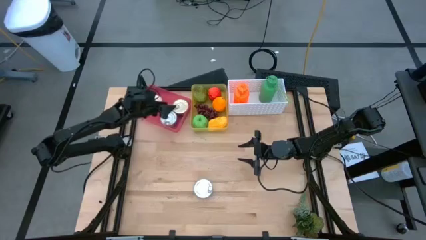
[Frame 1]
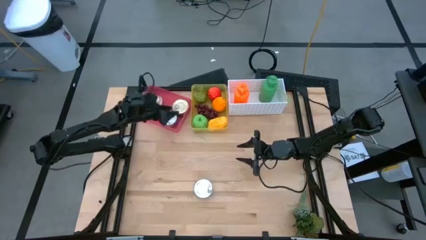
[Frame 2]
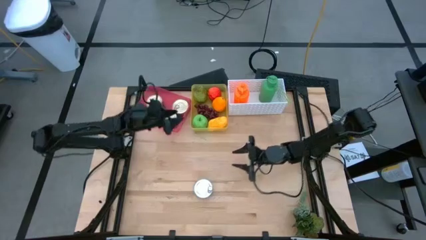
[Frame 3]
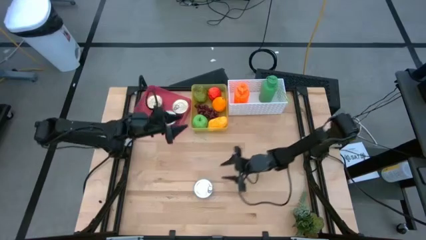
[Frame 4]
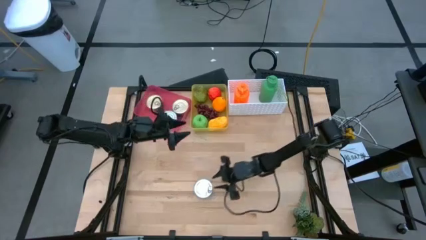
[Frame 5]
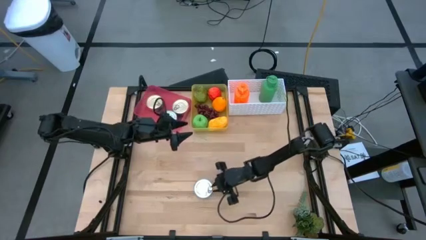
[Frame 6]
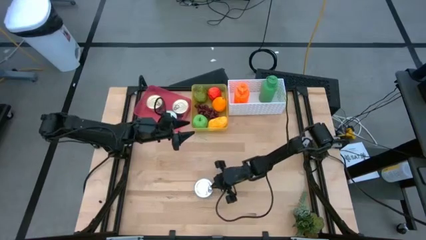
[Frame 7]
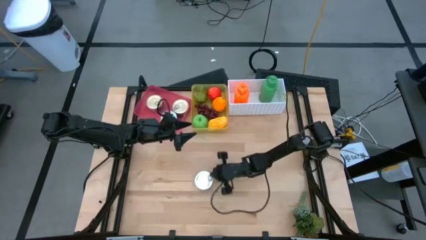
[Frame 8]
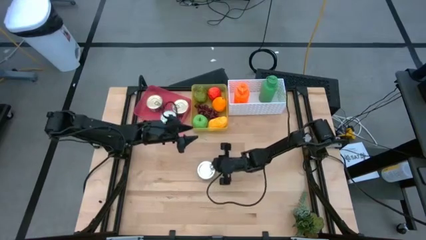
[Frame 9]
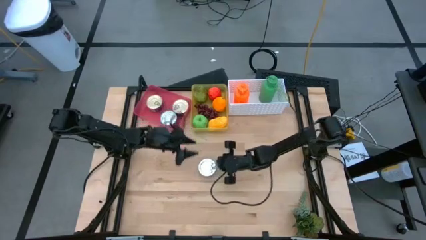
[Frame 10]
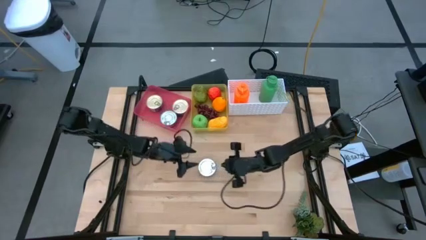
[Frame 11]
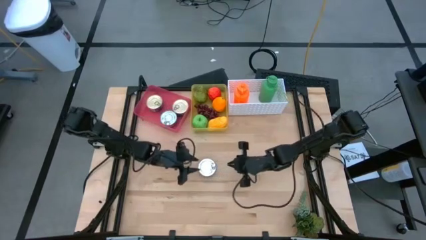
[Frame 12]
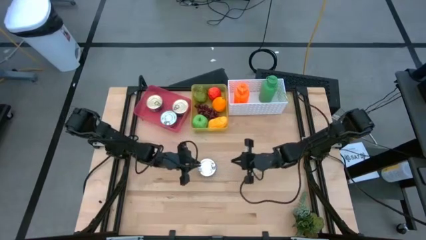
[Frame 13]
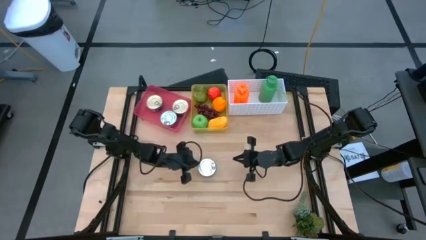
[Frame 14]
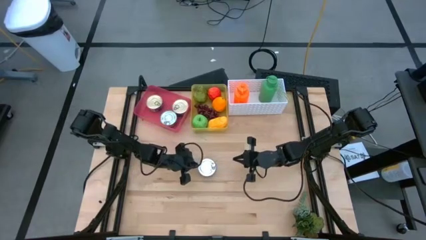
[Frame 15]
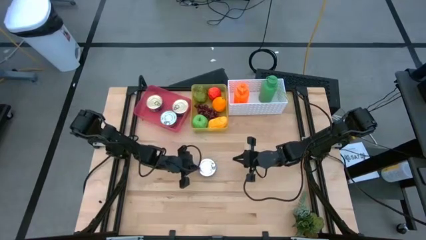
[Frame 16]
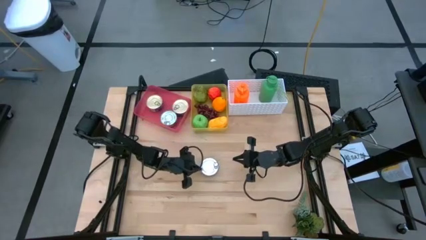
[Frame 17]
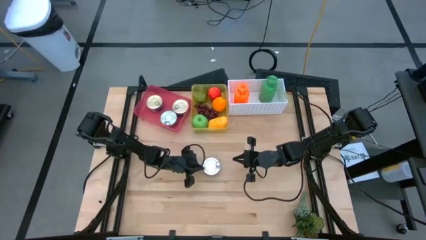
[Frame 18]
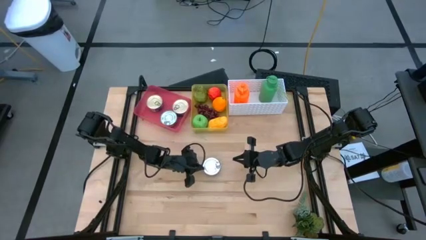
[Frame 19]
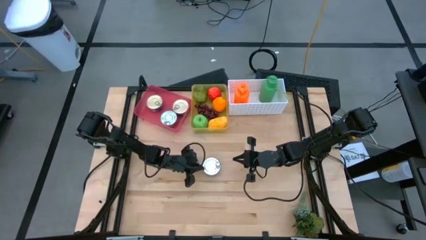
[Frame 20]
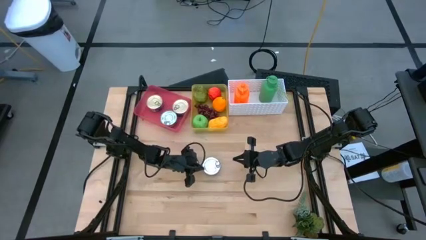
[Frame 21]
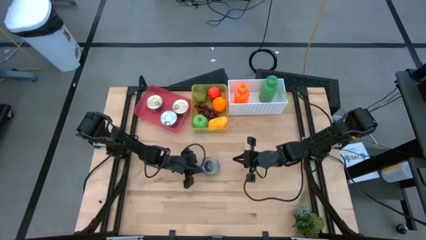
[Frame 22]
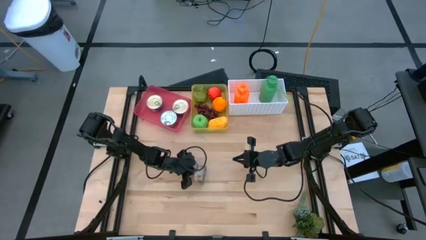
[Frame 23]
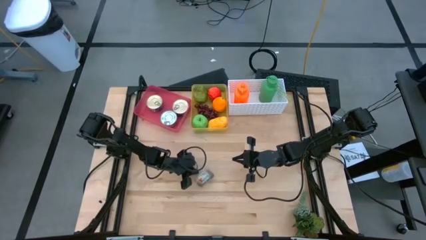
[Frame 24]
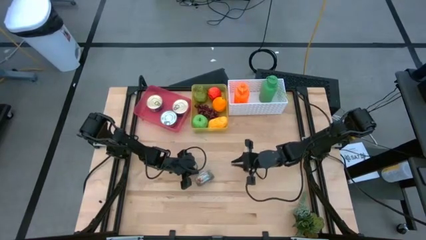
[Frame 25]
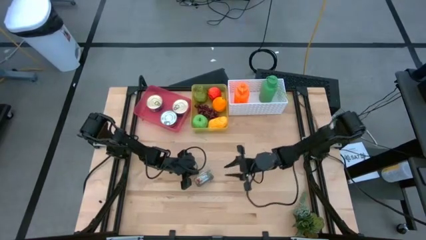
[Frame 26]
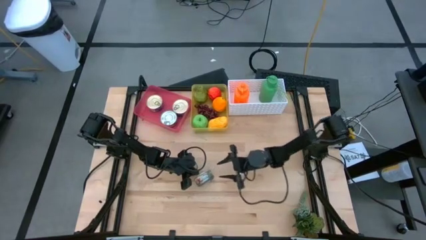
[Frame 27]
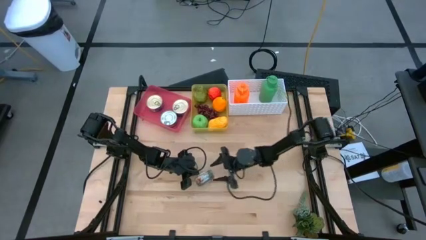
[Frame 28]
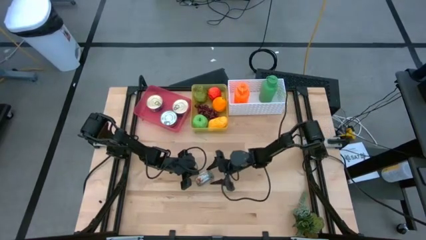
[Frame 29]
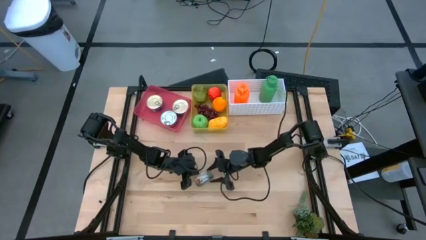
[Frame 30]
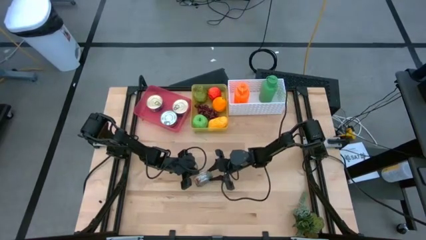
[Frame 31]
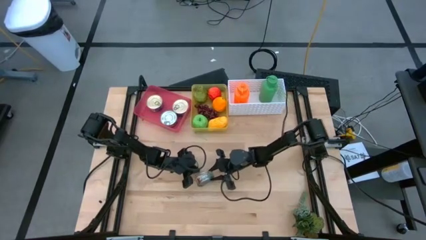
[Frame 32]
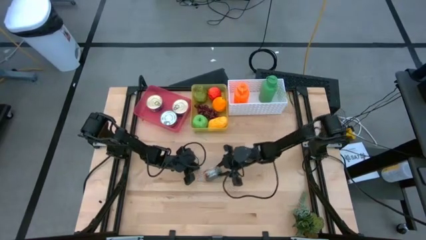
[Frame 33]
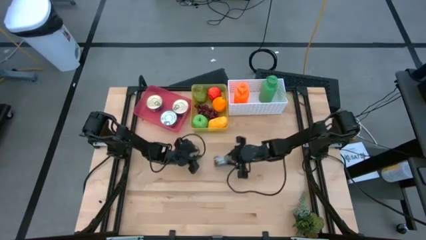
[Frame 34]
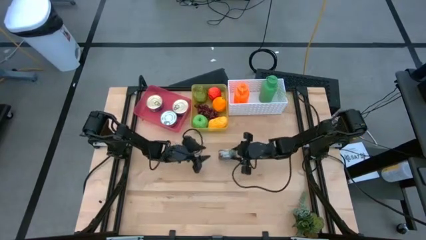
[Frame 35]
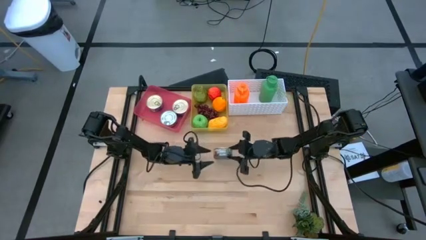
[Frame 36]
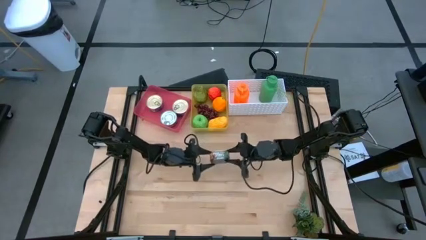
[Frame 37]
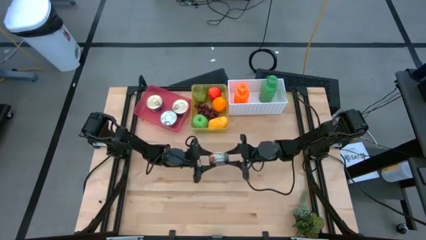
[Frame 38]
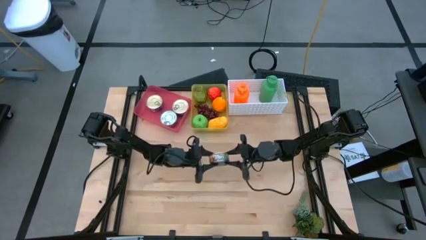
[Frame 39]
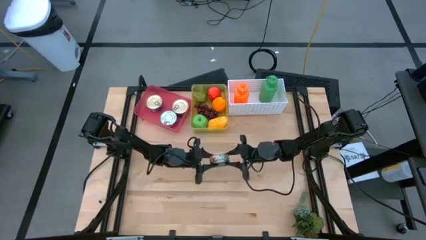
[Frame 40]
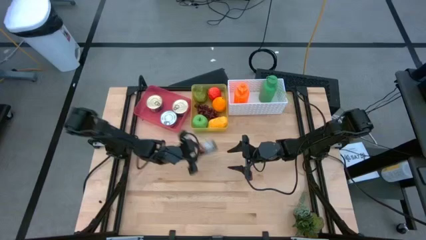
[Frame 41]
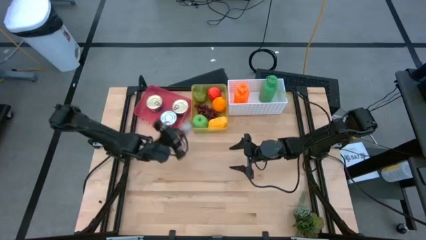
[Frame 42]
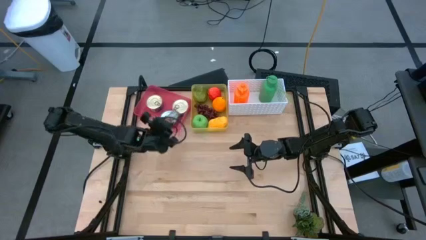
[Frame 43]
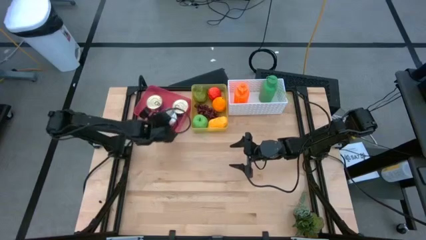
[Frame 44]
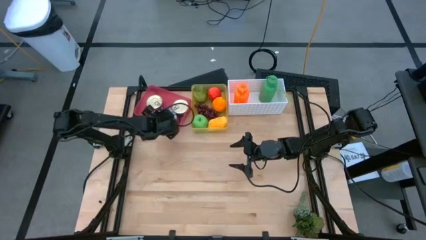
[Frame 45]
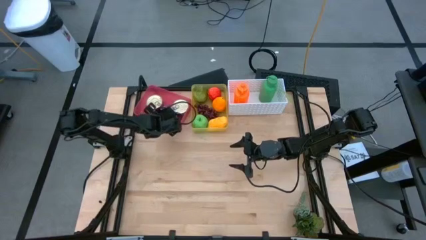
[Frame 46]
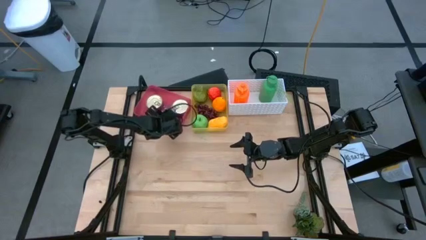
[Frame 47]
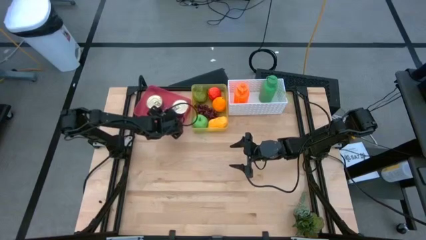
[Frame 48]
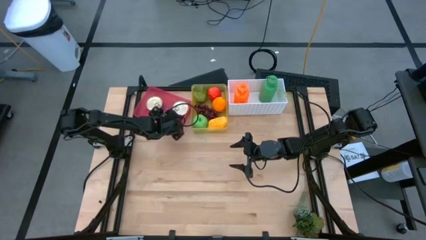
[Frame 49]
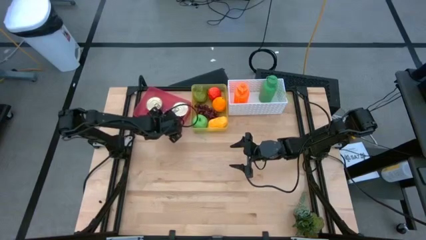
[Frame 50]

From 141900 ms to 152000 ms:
Task: Pick & Place Food Item
Put the green tuna can into the red bin

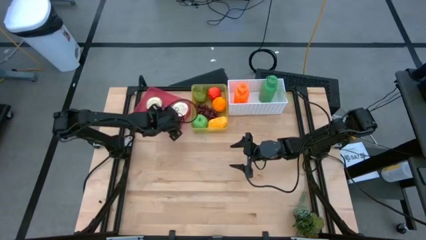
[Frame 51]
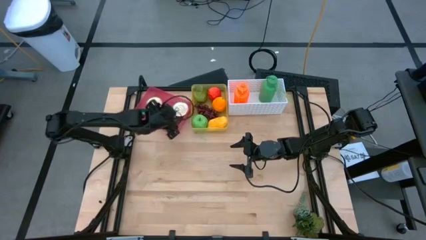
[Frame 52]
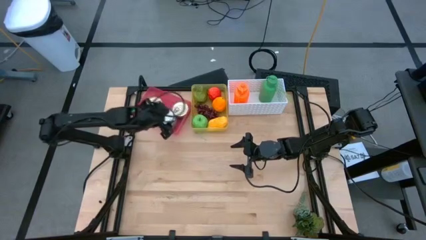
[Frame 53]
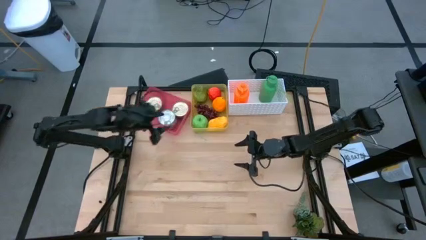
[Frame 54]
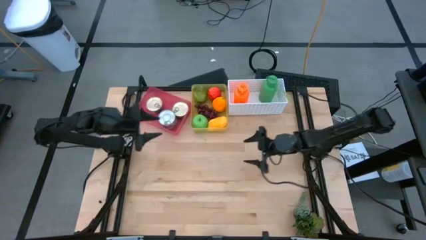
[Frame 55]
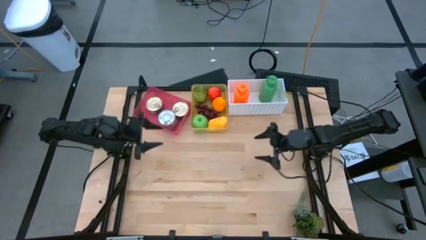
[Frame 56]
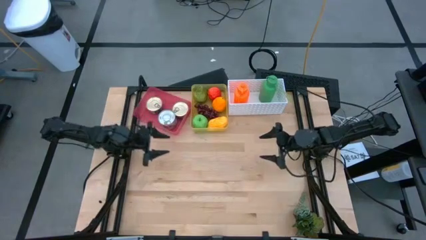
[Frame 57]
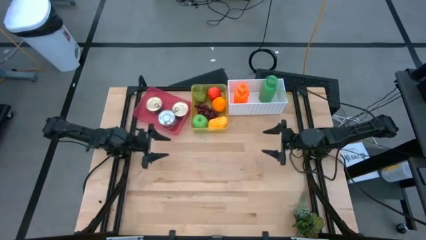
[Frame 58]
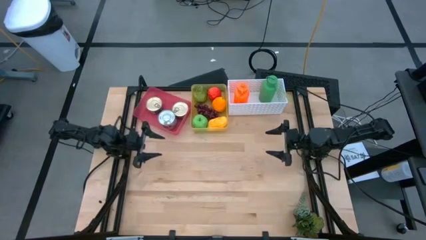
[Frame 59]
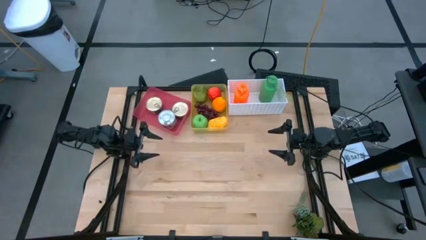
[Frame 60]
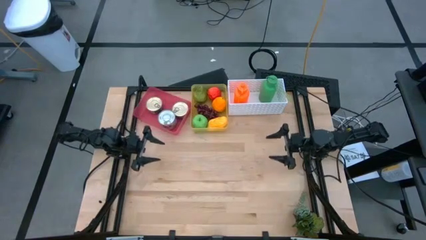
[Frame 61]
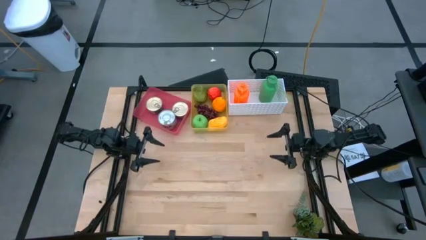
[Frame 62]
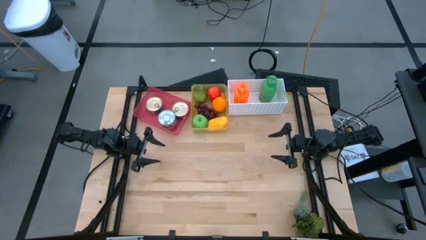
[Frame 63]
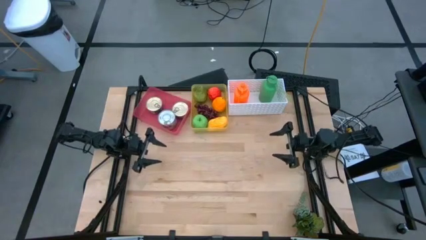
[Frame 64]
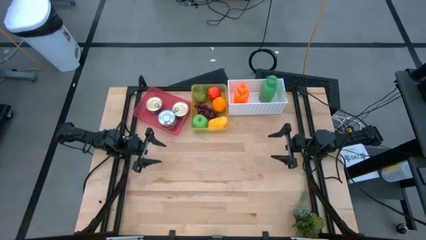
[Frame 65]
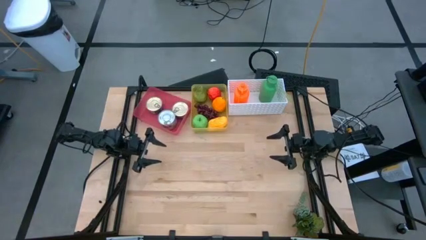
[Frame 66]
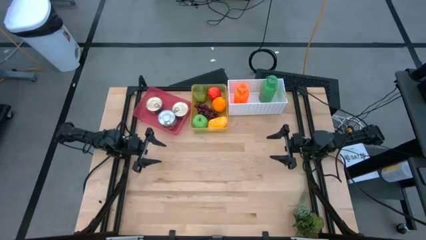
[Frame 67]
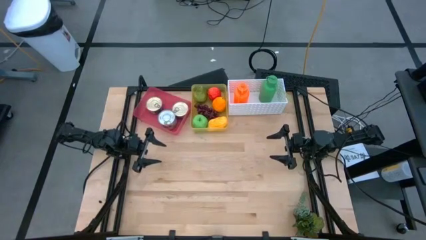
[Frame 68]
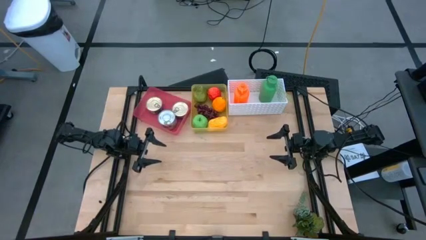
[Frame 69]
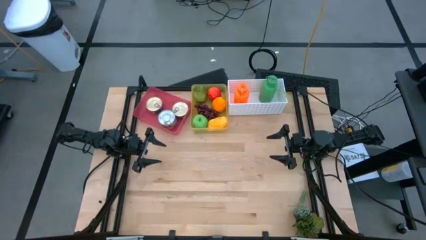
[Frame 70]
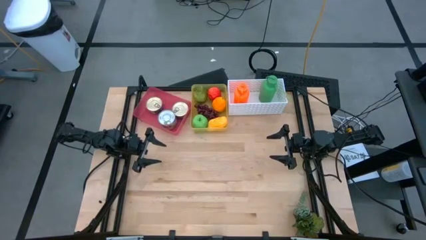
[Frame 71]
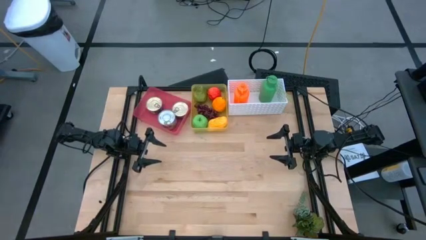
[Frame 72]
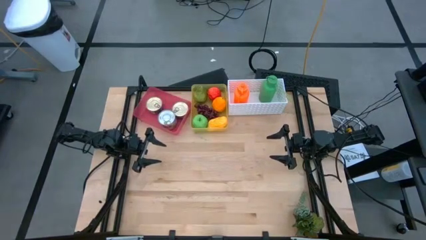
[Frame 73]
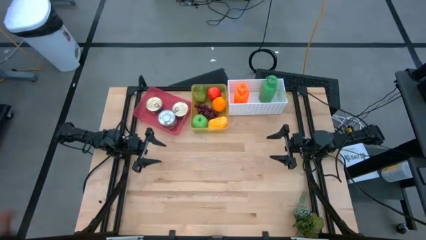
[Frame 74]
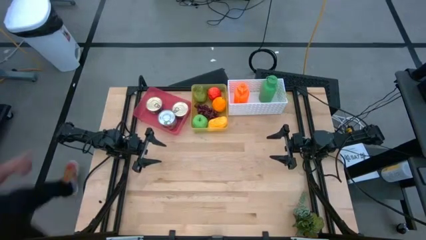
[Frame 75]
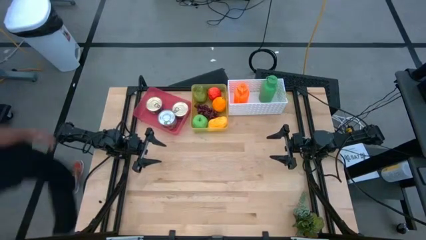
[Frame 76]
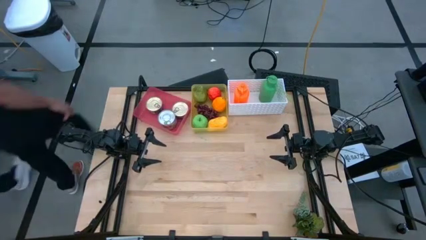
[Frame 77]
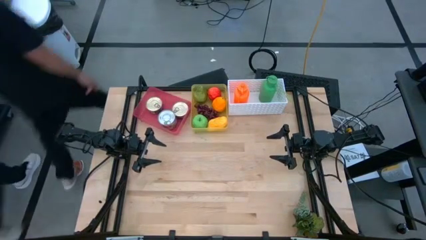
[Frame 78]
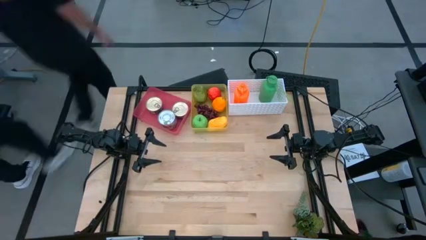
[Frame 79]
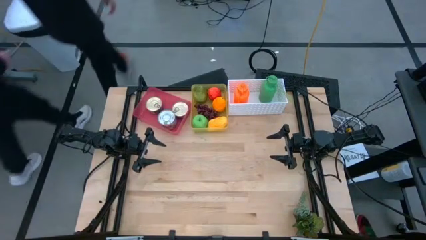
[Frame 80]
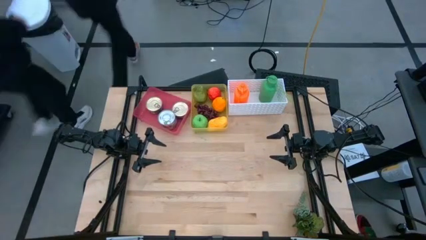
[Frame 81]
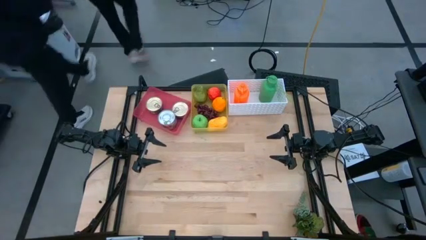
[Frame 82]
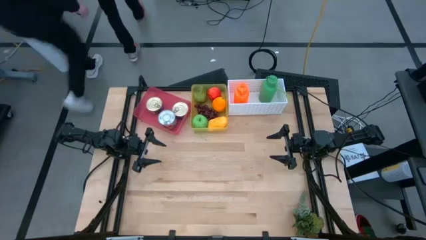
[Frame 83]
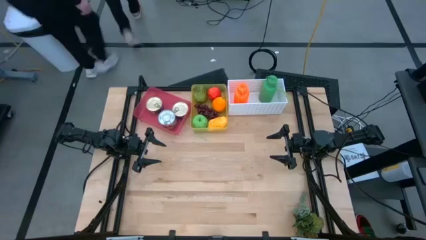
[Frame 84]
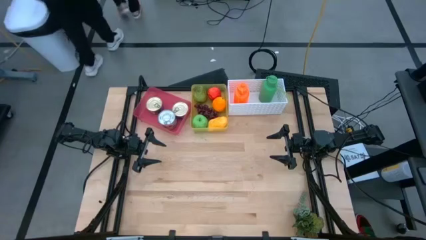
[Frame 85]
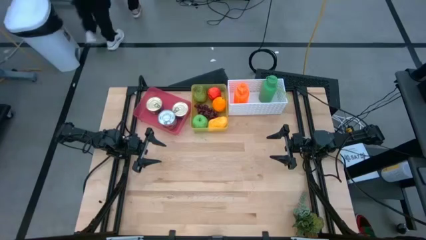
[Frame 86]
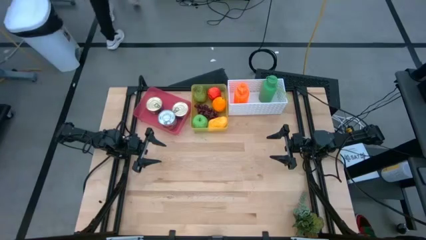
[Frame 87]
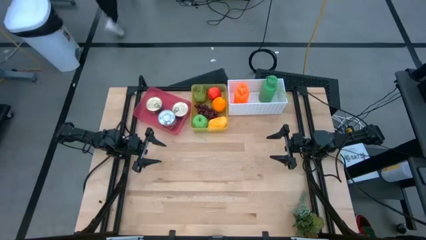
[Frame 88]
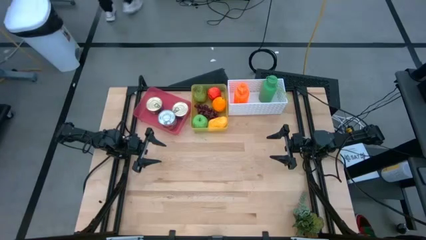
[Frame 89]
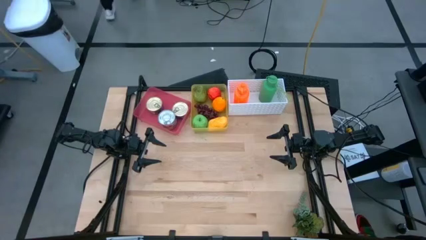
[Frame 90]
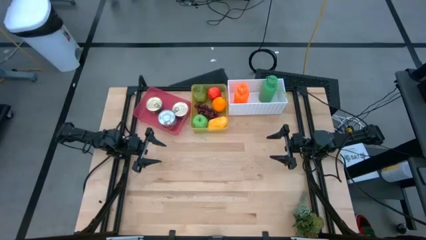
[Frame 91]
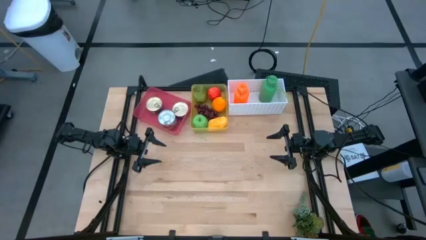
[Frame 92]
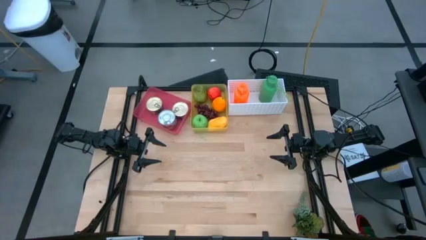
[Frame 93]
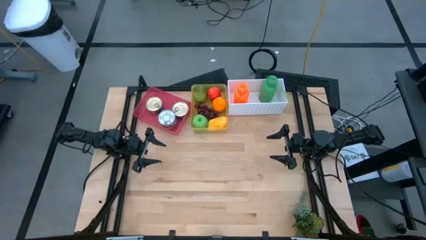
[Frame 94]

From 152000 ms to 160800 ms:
Return to Home Position
